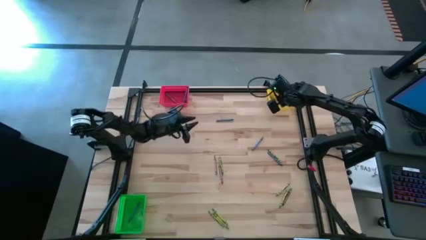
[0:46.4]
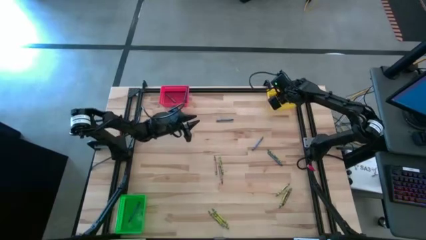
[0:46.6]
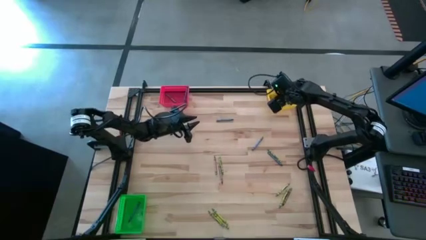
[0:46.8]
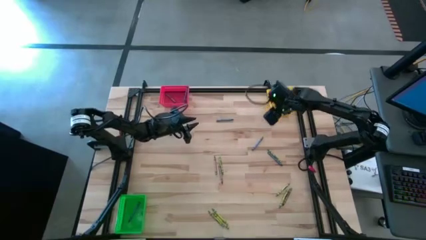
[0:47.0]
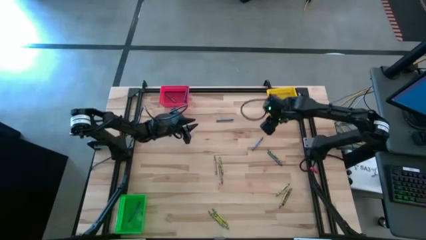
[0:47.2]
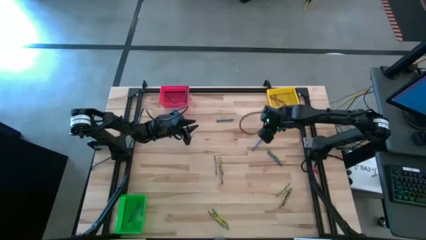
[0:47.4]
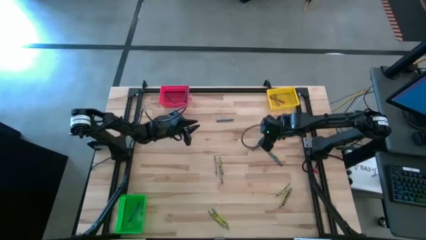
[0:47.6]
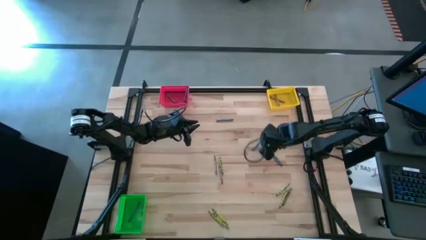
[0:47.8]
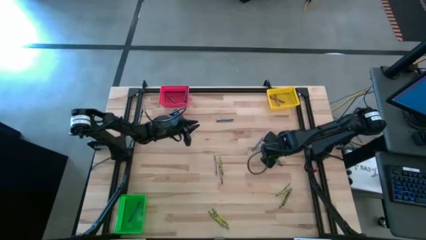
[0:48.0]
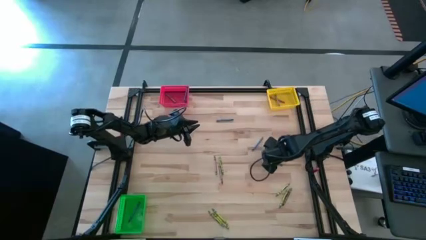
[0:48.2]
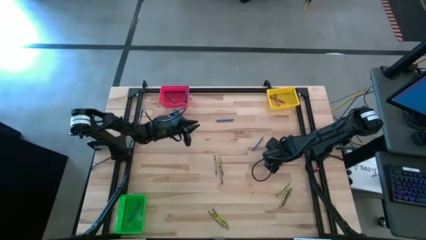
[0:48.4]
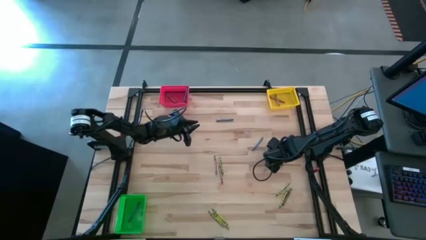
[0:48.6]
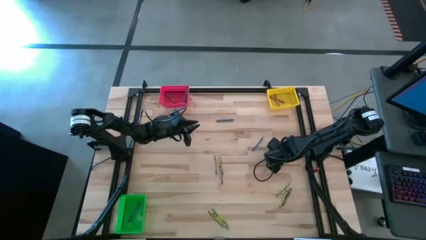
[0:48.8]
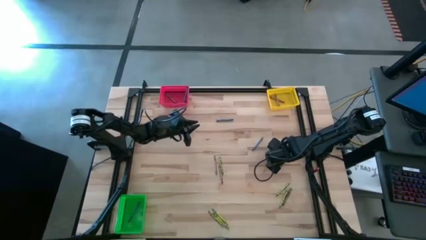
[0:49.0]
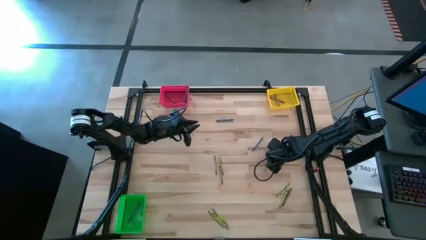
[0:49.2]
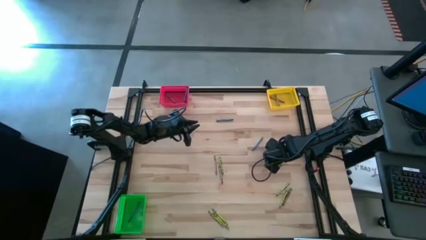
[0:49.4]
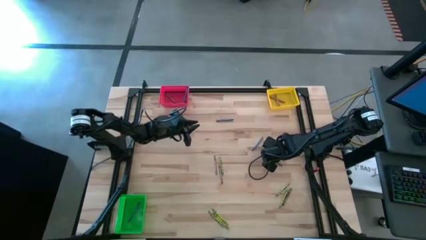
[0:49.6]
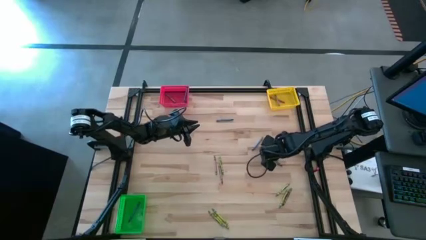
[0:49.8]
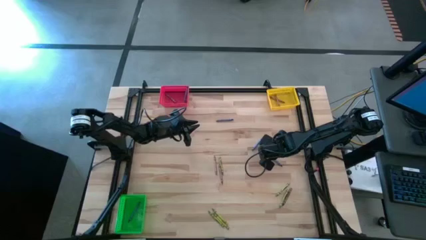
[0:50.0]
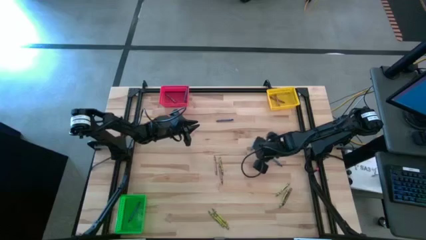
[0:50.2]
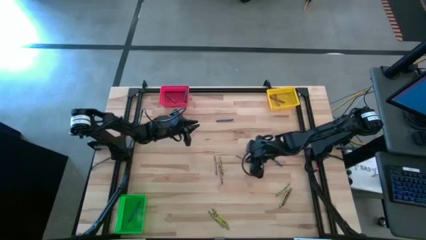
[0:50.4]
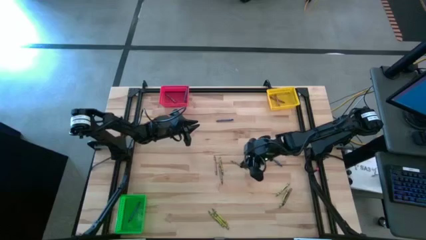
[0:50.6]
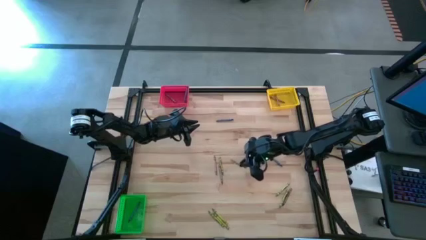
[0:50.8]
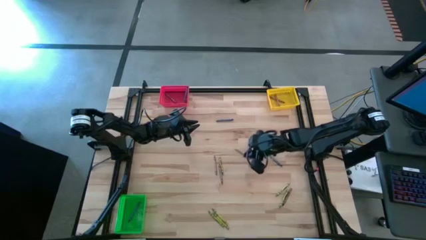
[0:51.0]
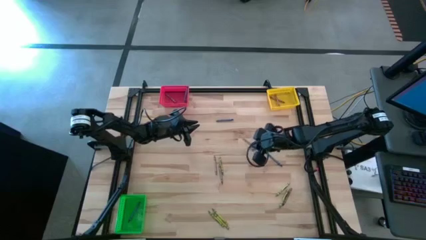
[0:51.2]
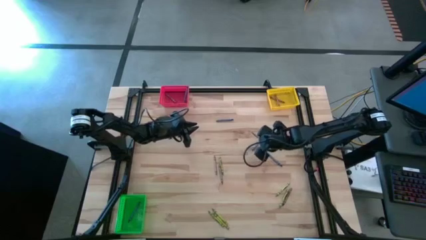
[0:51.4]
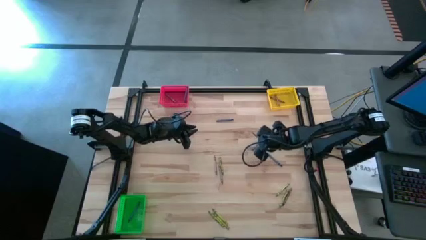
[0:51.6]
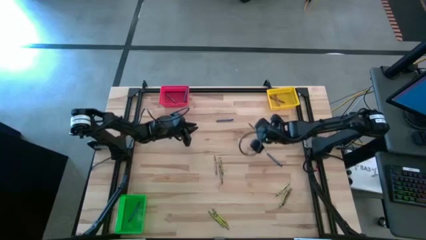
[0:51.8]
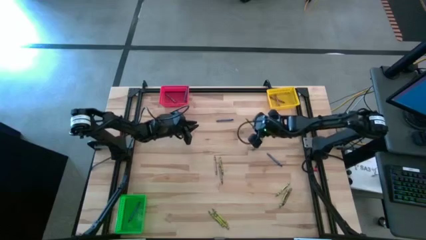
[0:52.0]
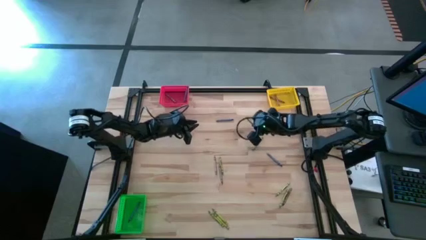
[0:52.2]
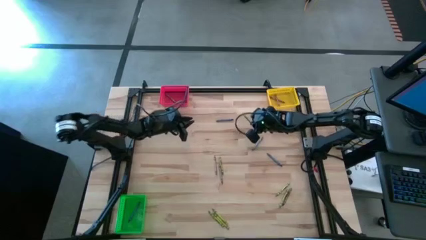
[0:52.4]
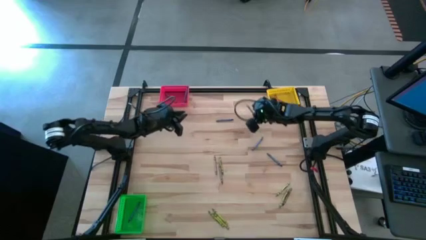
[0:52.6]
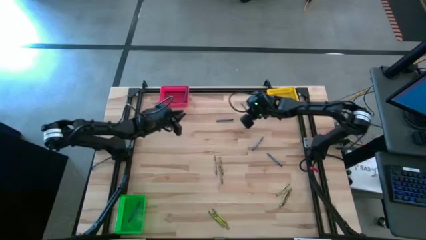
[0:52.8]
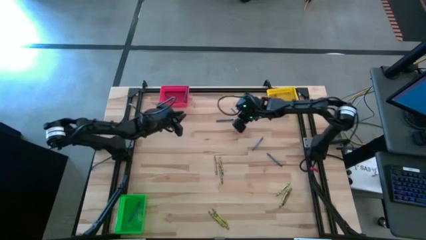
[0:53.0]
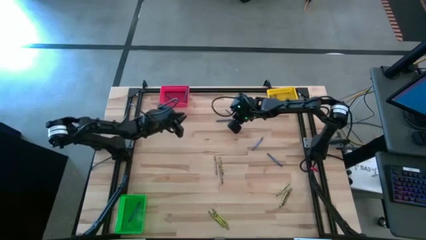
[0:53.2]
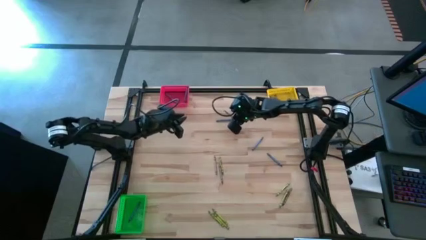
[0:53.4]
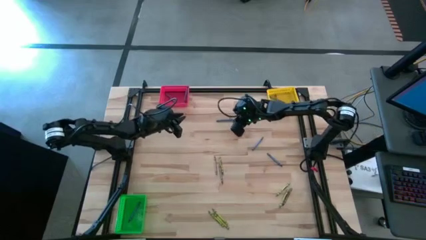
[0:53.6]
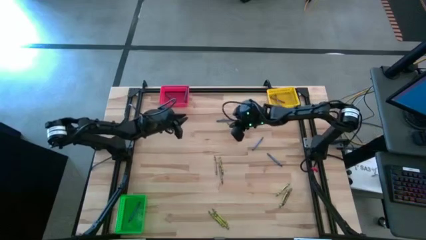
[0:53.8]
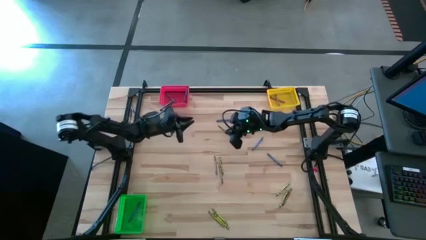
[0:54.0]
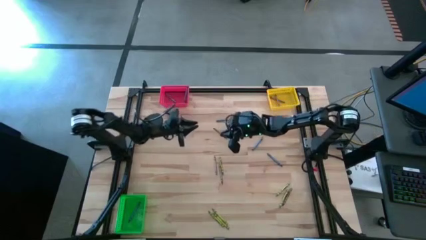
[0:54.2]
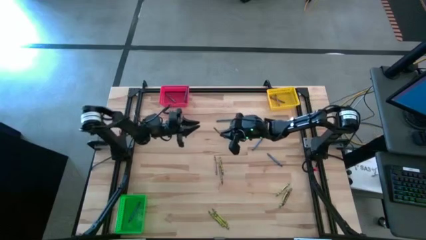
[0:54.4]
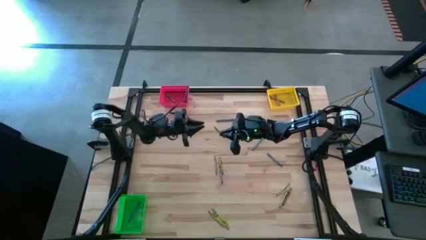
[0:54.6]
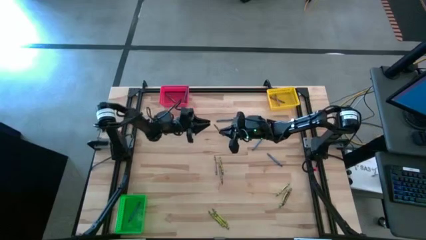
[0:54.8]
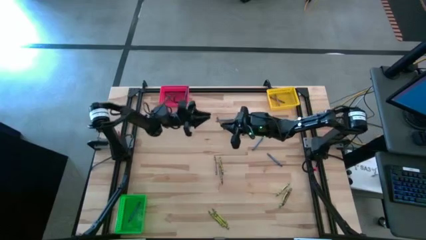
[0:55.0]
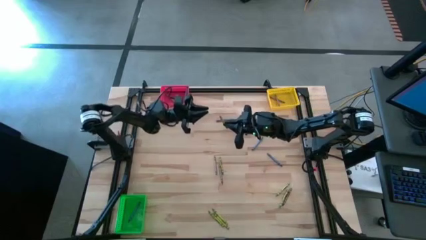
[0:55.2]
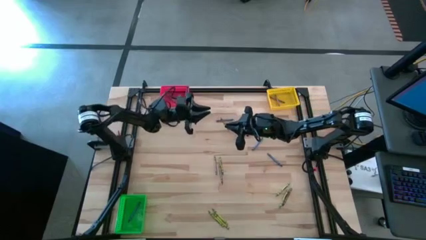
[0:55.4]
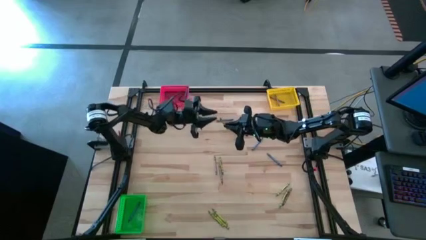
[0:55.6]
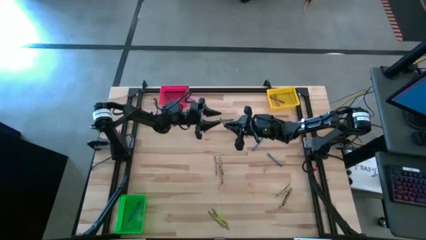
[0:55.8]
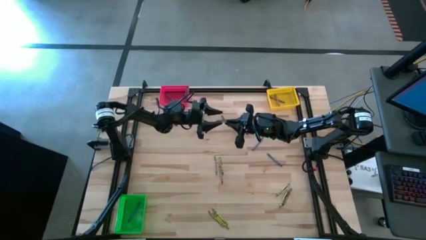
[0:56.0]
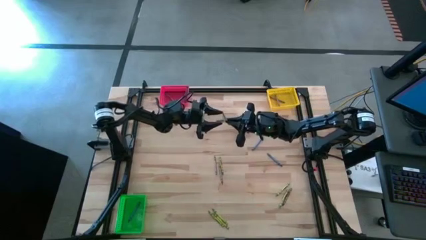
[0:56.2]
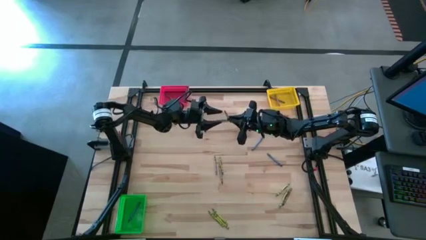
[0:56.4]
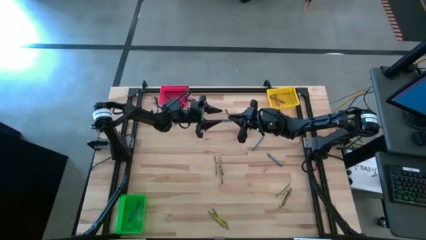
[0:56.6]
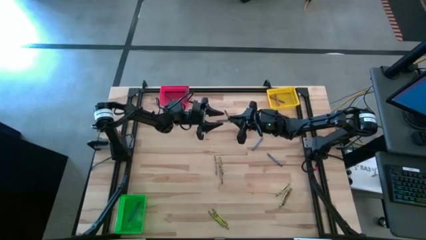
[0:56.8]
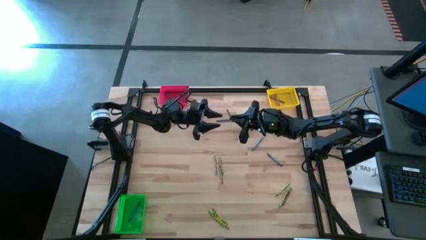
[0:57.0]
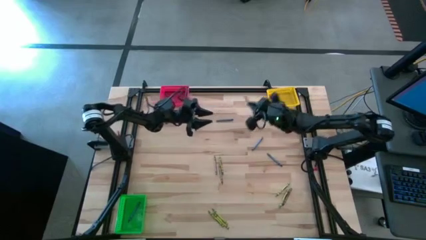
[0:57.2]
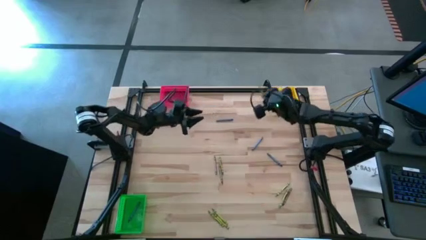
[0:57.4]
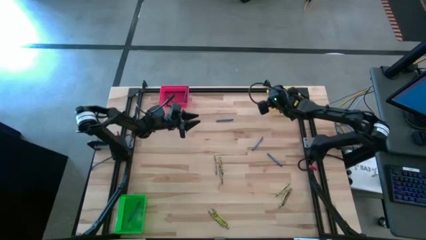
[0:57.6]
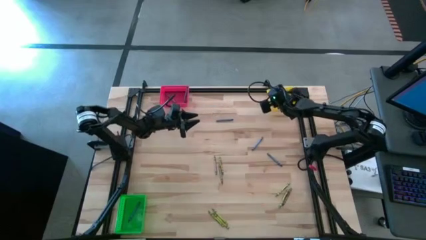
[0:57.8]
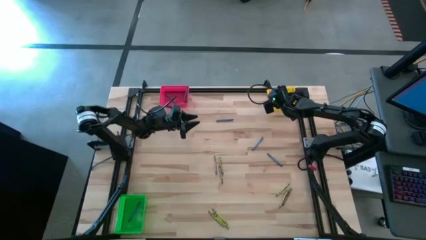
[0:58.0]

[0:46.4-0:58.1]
Task: Sort crayons
Put the green crayon into the yellow bin

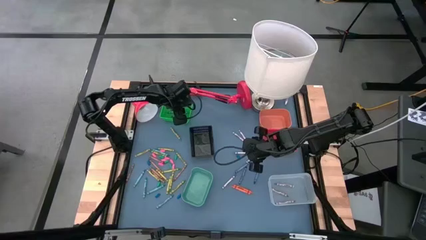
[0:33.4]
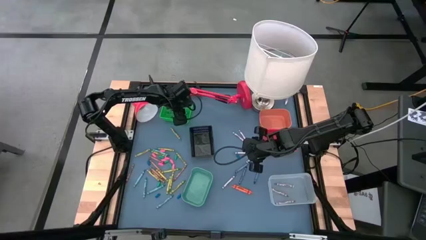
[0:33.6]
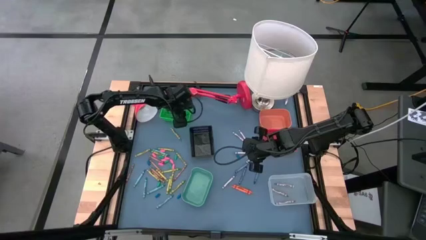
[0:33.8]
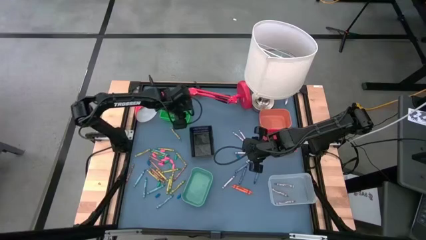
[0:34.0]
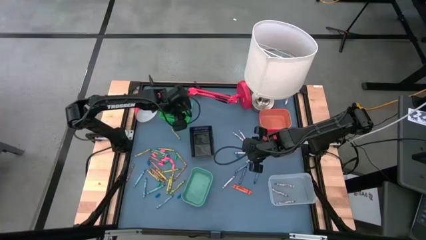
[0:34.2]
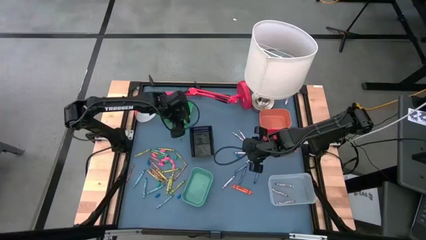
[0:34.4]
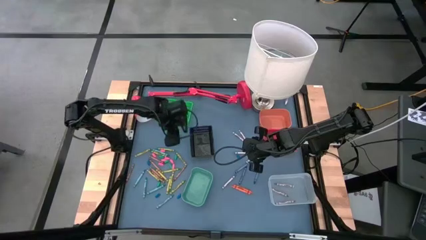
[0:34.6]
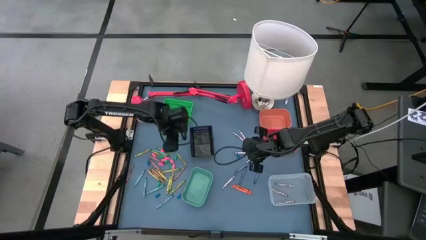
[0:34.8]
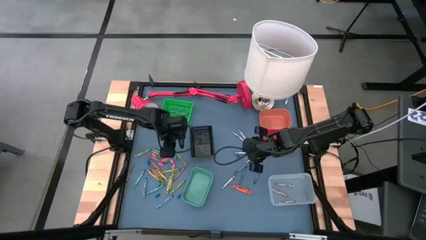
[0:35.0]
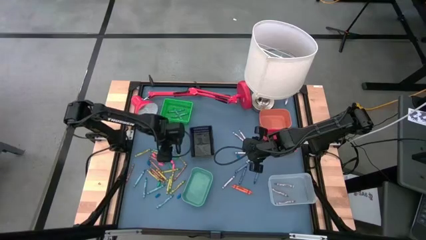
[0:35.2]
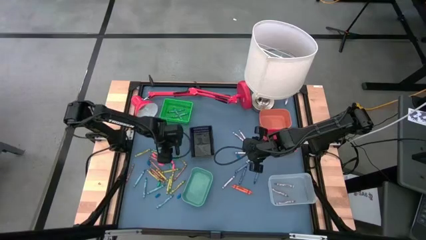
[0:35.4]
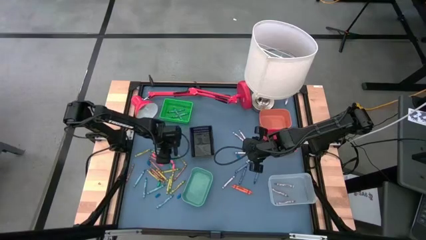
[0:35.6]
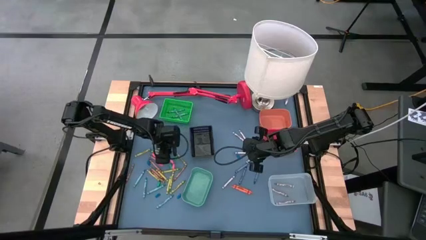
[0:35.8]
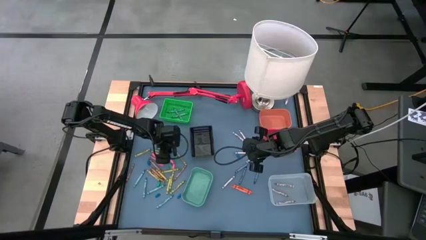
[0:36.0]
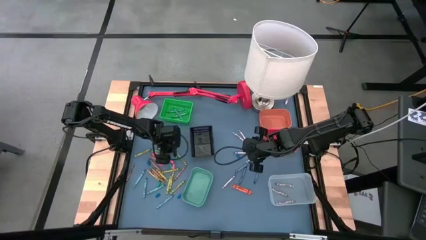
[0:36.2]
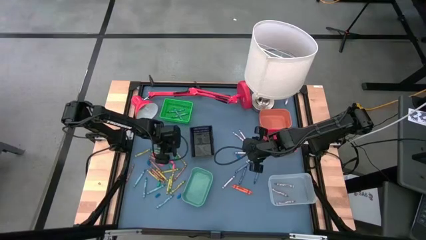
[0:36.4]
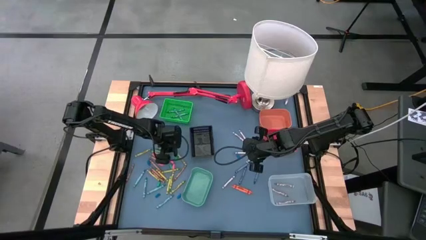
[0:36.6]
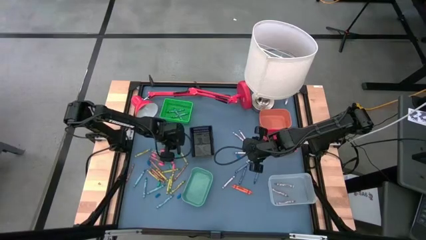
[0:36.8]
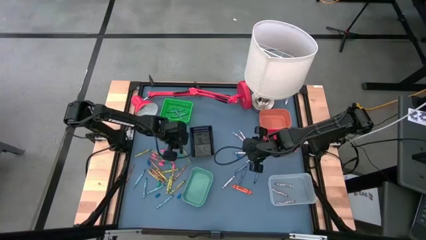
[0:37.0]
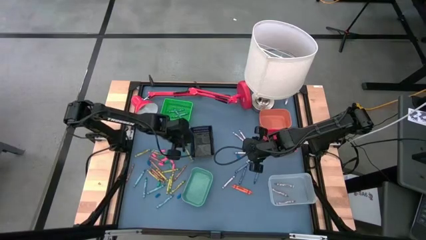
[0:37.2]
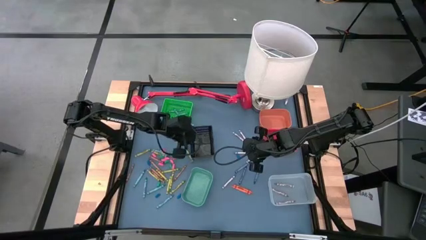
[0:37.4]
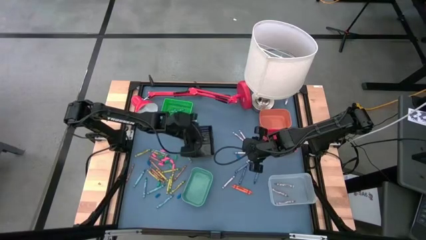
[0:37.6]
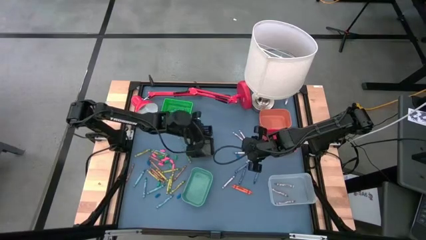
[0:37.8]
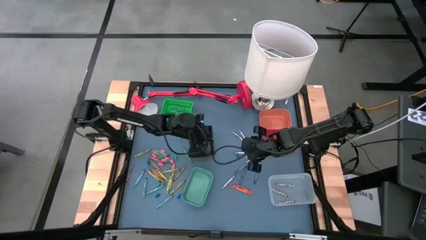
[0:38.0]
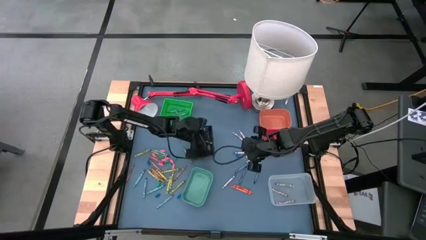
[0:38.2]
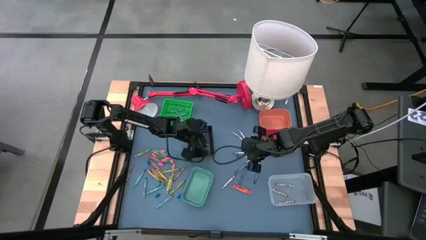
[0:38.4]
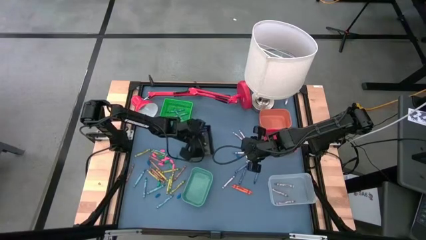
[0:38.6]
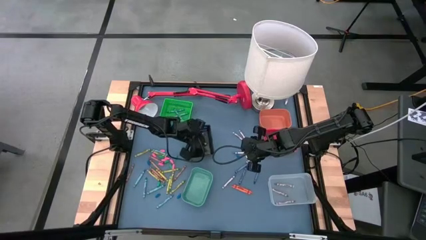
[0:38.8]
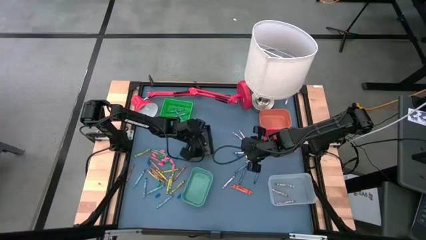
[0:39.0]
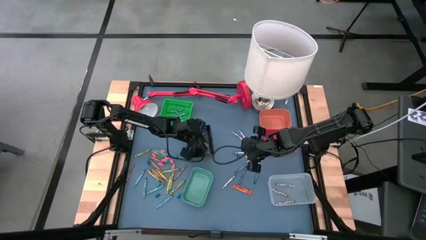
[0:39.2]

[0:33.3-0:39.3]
Task: Sort crayons
Put the green crayon into the black bin
